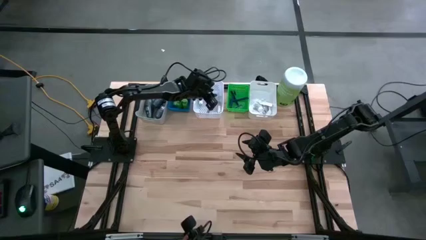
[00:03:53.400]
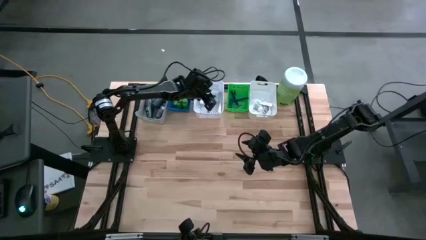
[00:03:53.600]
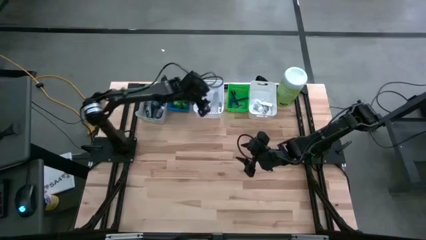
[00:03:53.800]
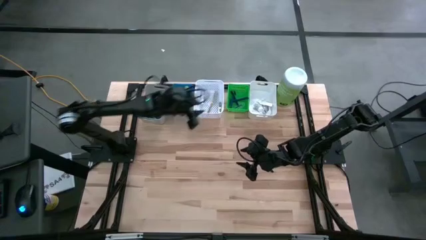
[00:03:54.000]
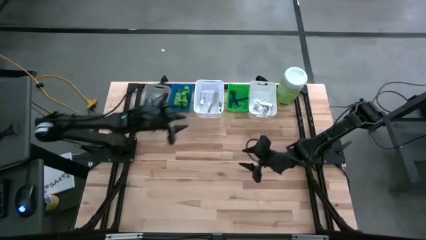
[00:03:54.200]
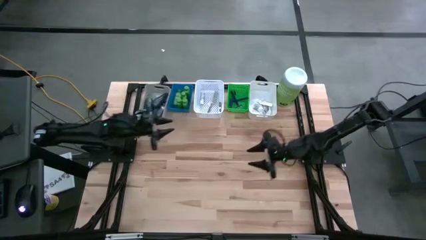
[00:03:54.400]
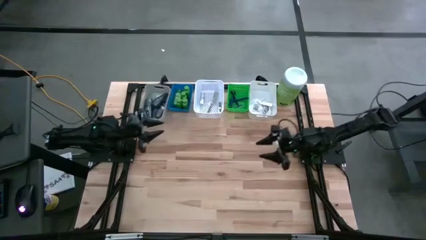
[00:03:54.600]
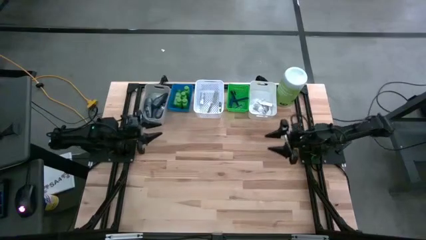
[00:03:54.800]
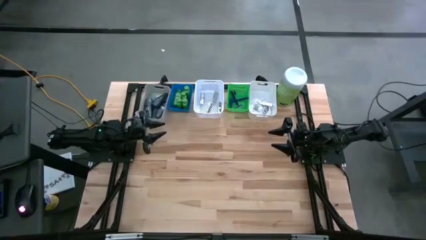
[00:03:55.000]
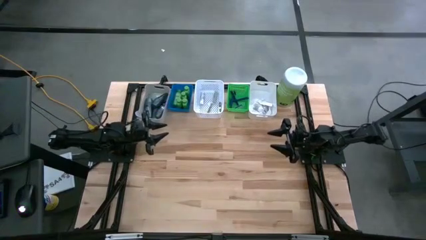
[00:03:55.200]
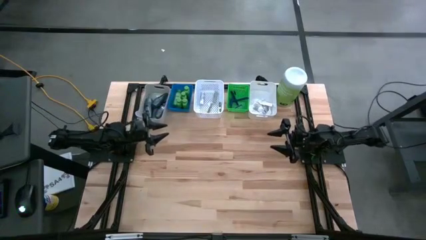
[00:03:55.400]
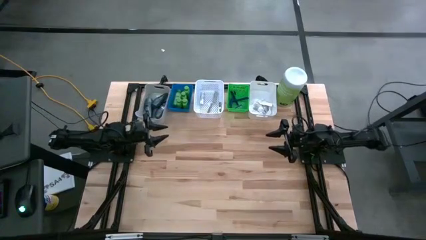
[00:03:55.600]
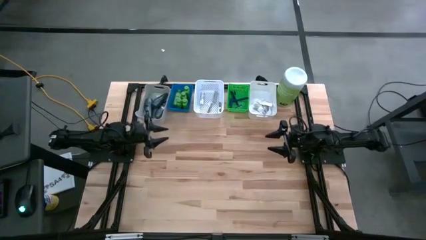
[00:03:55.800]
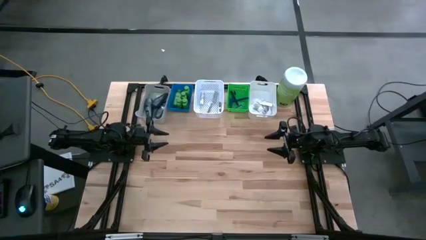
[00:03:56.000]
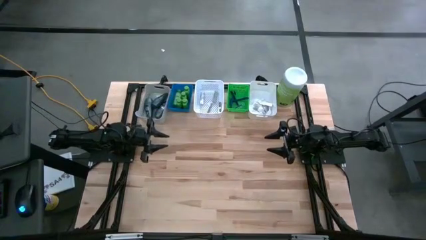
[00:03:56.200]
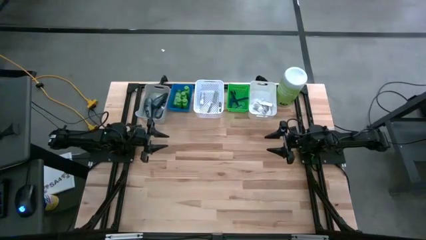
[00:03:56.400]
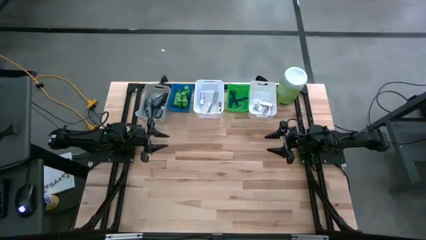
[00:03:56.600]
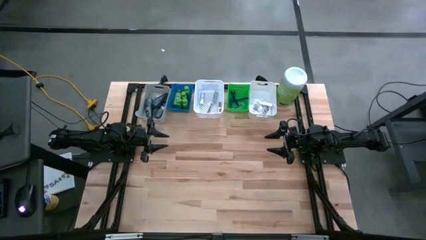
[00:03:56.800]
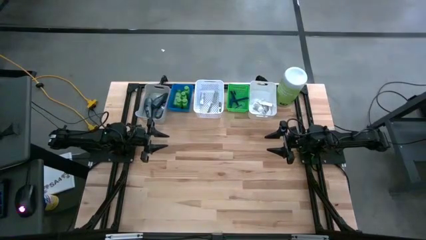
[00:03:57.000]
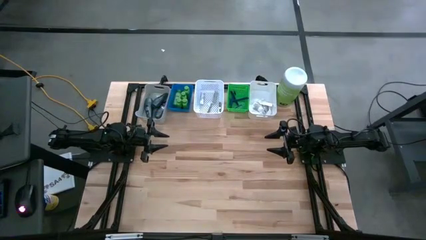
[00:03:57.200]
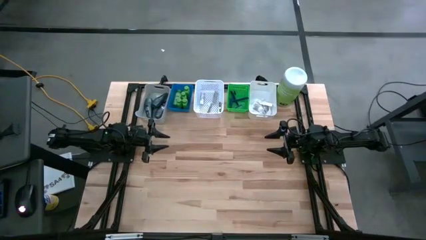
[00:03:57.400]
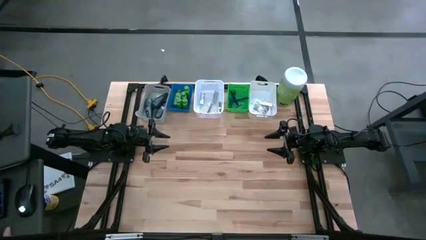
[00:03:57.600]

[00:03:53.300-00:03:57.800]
Task: Pick & Place Travel size toiletries
Return to Home Position

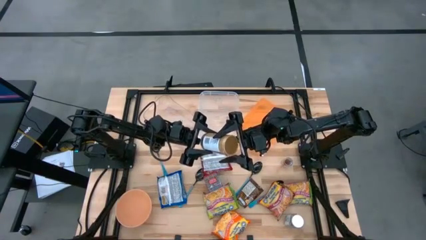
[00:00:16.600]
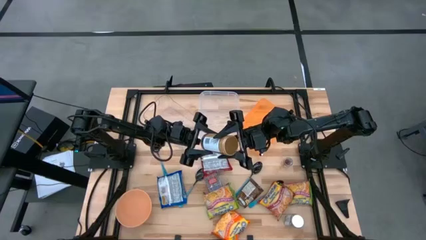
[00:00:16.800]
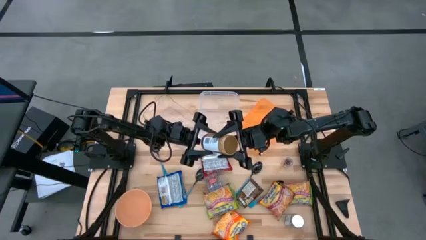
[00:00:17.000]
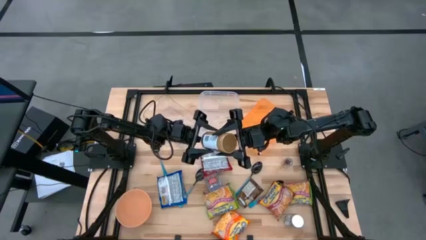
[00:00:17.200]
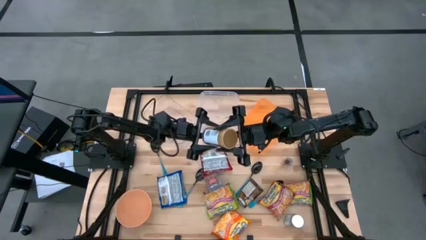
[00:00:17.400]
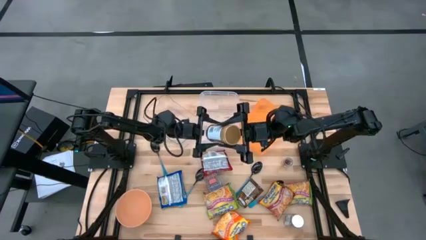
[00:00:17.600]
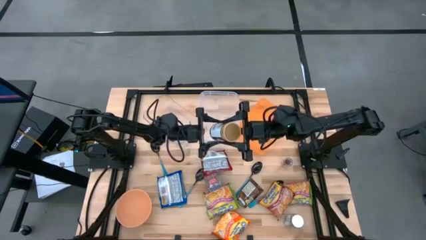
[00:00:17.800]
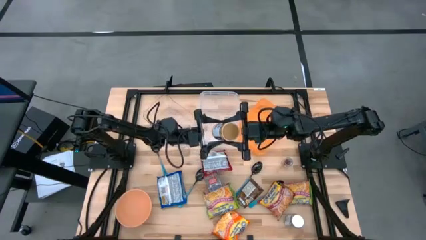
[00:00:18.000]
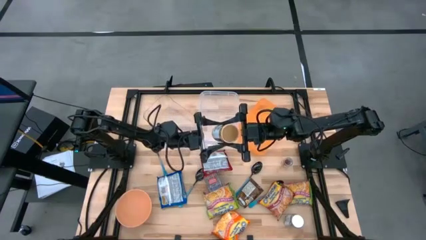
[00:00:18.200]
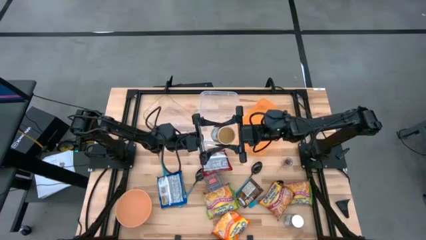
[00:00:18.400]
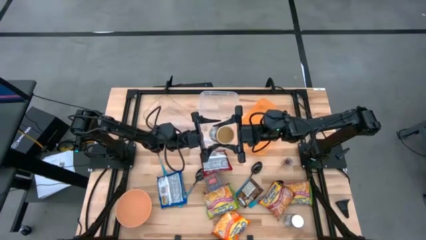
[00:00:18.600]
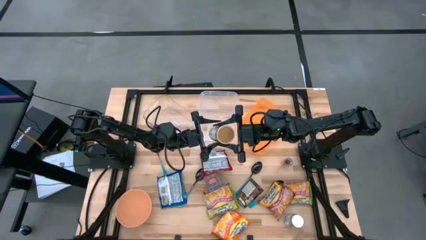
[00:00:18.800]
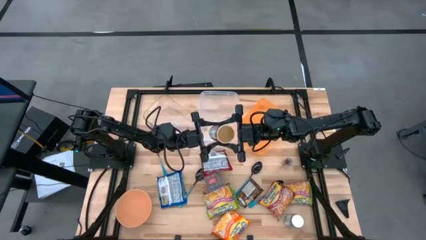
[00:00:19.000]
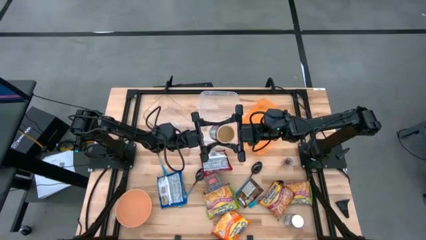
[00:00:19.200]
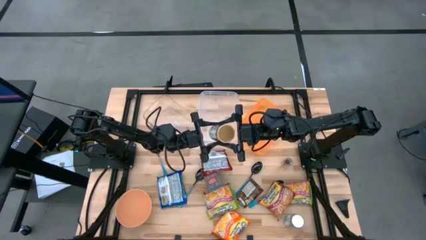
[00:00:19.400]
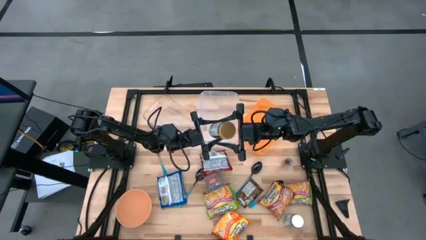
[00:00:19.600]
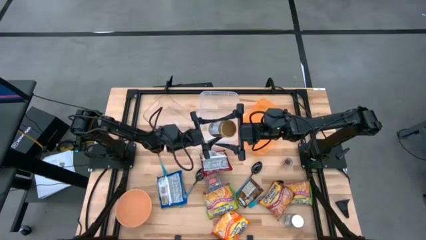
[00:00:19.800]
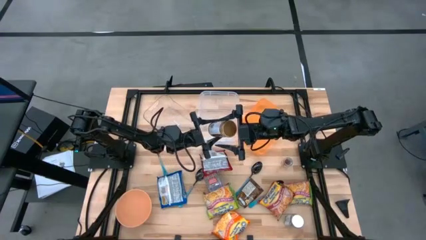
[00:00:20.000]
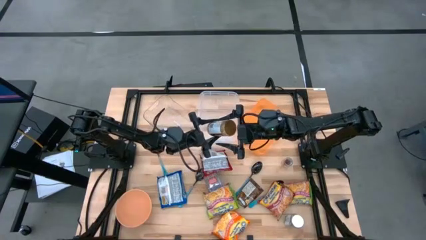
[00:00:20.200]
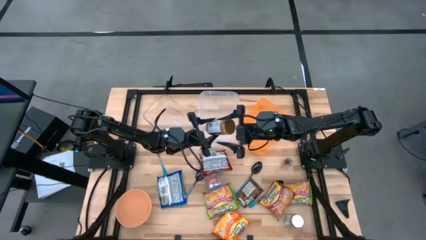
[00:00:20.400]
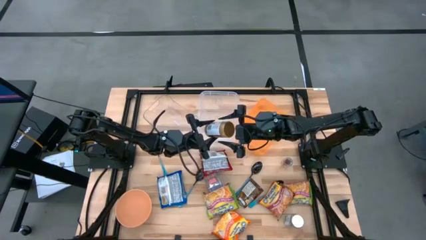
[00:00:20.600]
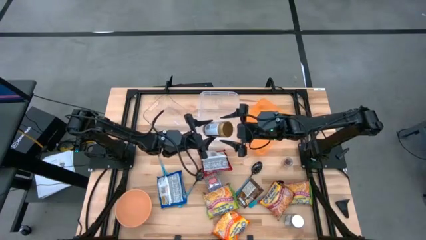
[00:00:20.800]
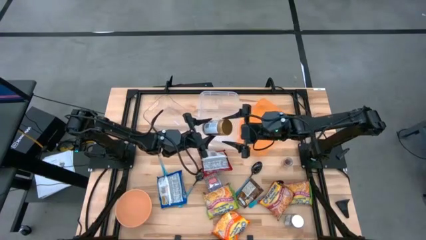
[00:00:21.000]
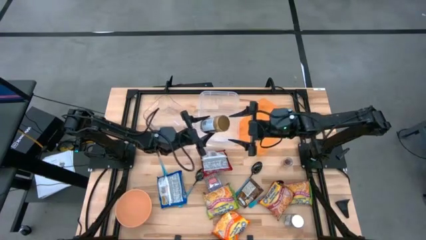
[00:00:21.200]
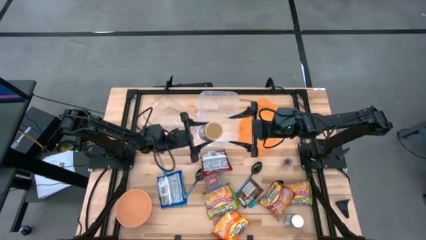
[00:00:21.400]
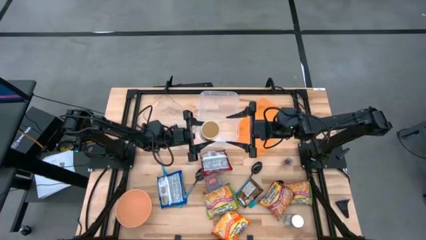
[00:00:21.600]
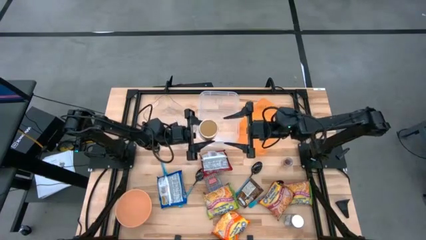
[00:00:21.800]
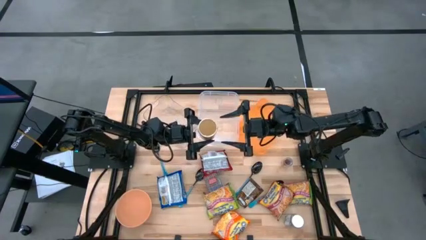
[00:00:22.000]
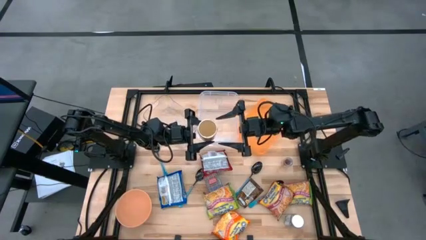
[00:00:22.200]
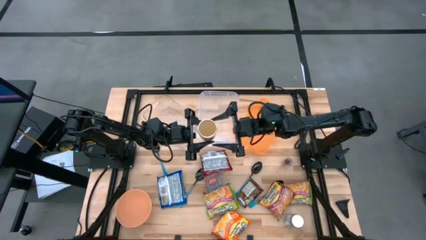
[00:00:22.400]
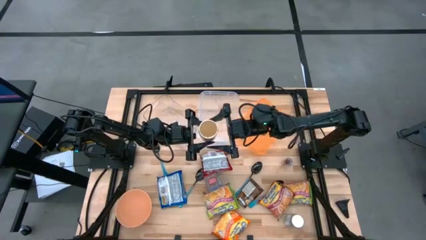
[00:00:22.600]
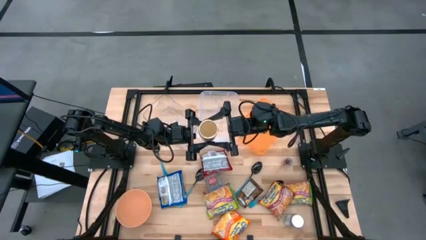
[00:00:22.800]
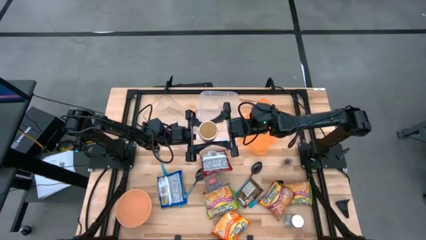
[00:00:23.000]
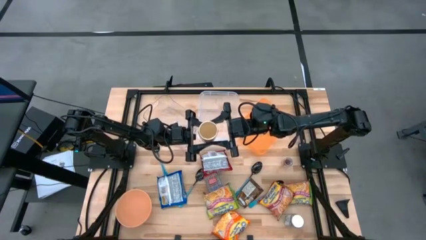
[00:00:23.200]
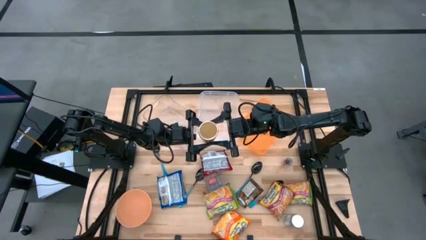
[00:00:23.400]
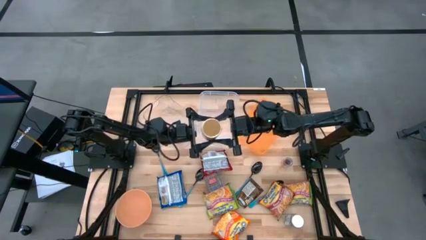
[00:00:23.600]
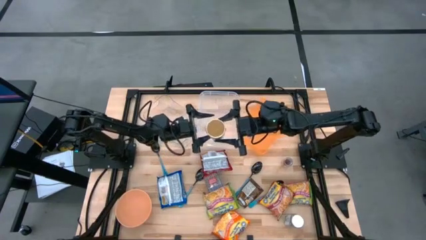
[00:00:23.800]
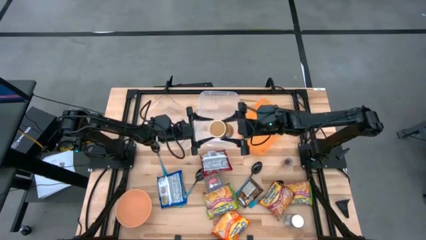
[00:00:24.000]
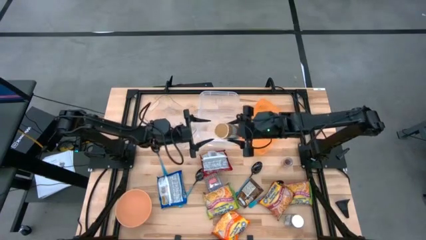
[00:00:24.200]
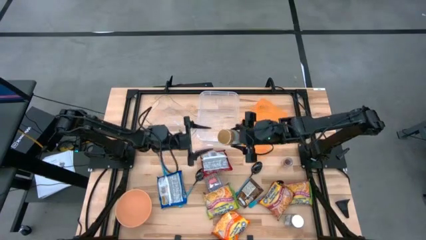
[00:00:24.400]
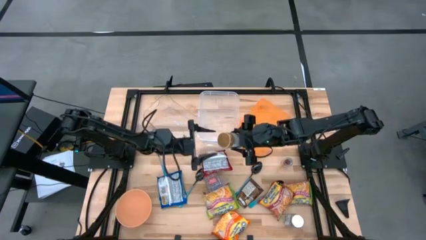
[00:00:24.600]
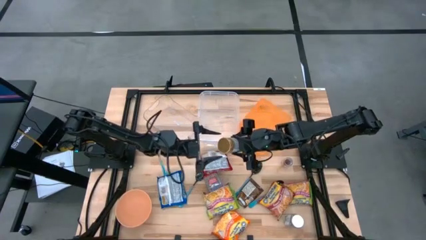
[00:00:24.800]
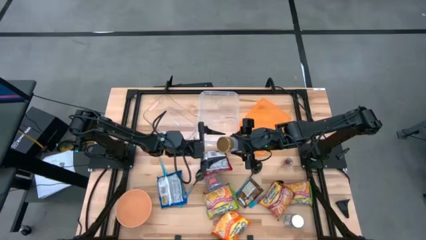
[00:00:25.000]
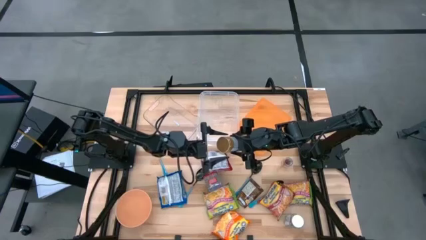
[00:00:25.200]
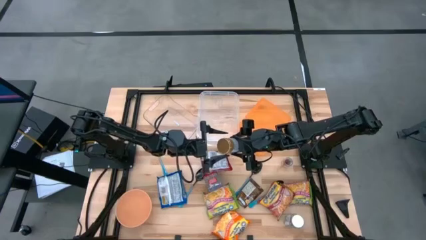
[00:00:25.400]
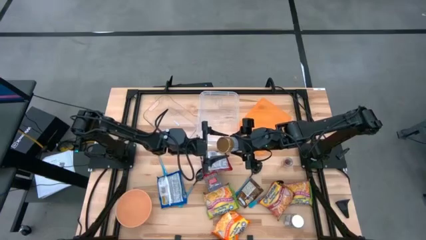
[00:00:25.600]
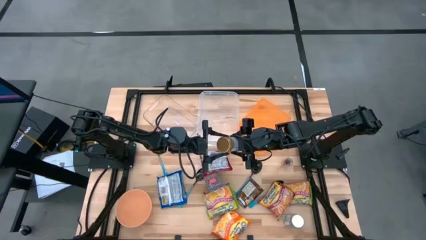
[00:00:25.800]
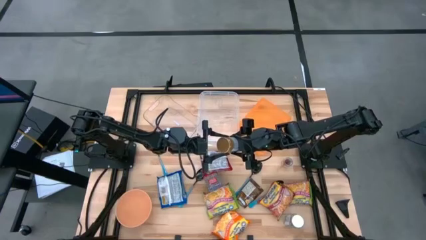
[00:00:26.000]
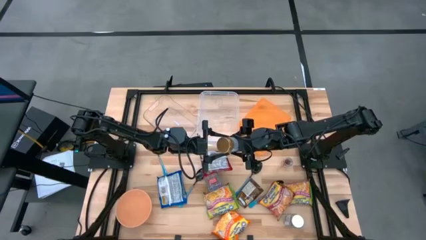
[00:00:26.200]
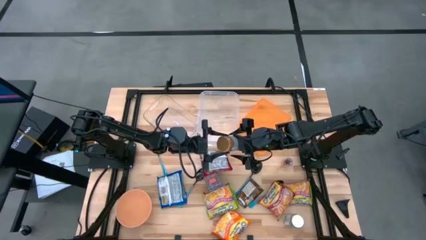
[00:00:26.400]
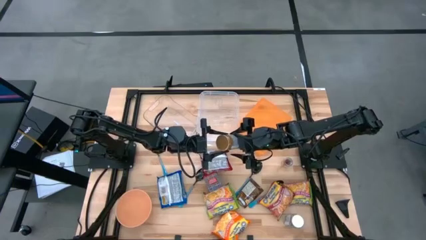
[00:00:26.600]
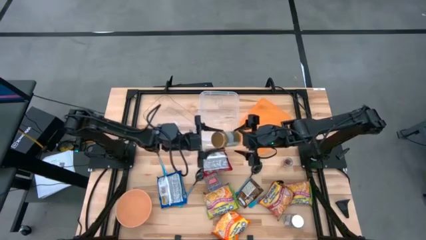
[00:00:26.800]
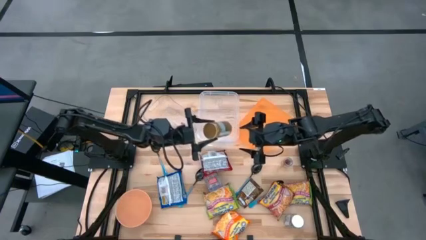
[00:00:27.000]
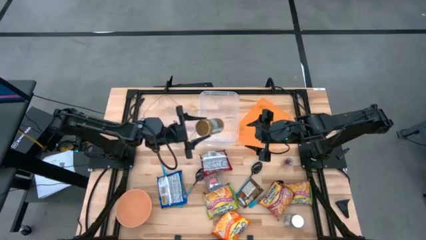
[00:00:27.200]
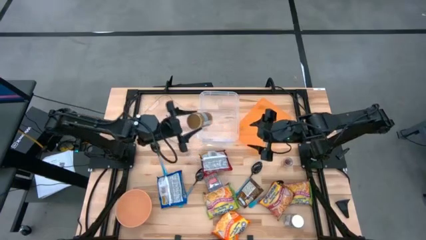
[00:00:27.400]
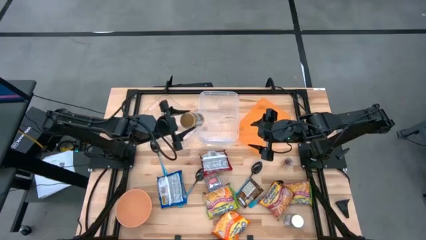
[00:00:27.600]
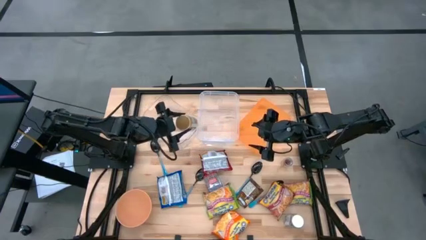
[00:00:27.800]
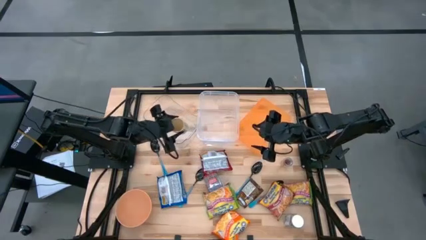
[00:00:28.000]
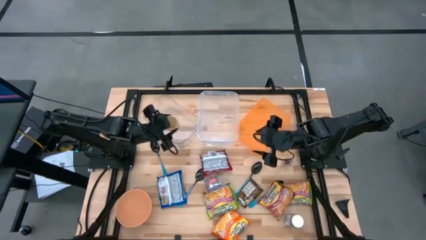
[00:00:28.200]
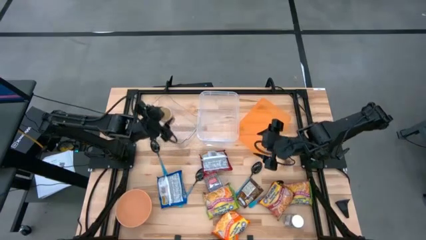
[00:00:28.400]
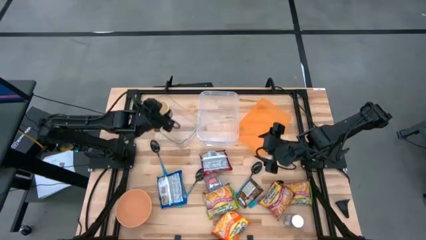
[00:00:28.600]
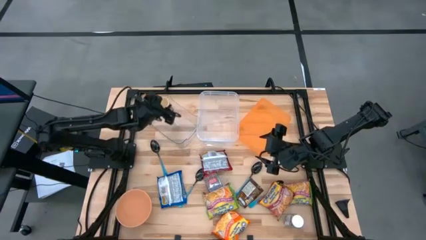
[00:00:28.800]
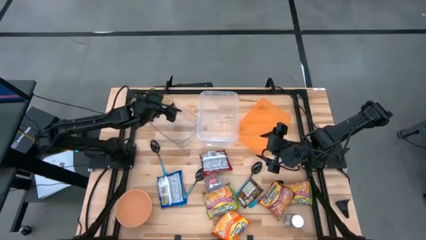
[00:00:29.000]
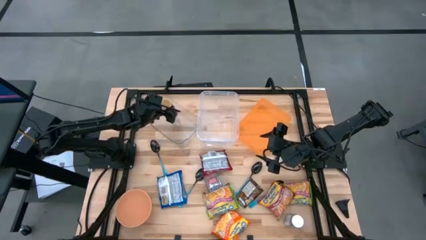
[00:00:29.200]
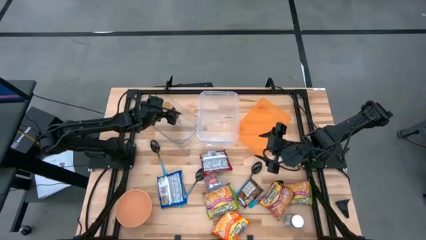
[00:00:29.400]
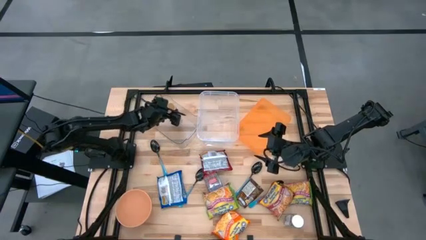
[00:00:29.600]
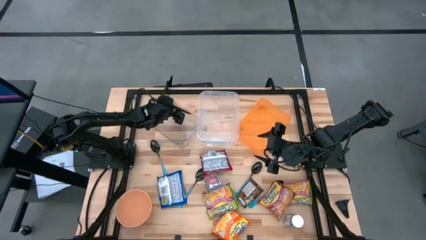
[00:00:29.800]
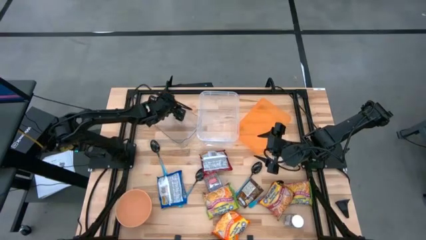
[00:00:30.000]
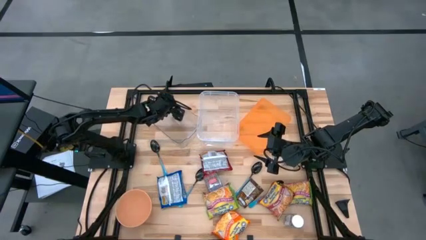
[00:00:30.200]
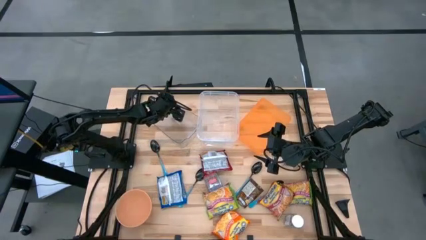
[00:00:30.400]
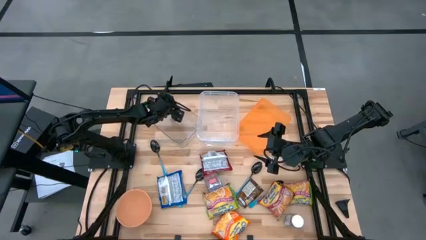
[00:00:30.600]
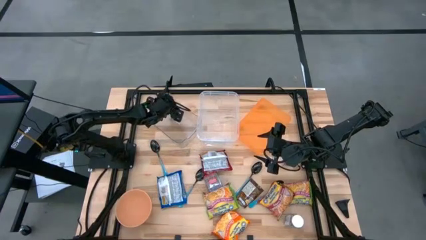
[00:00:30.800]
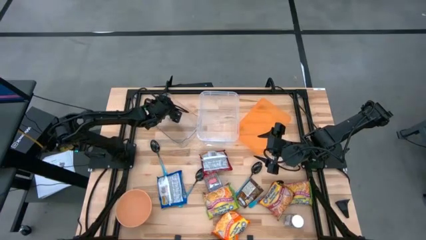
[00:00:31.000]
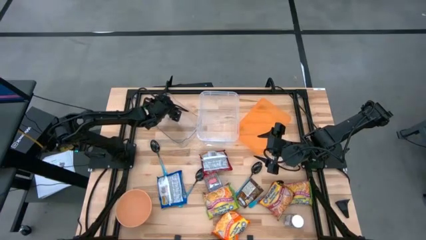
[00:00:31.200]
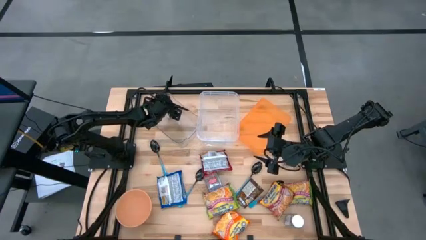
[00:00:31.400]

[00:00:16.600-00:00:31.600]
Task: Pick & Place Food Item
Put the golden seasoning bottle into the transparent bin
